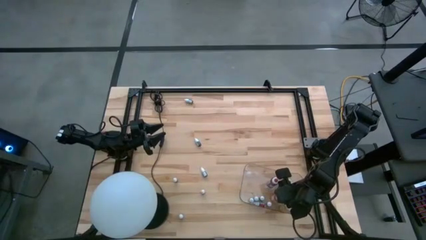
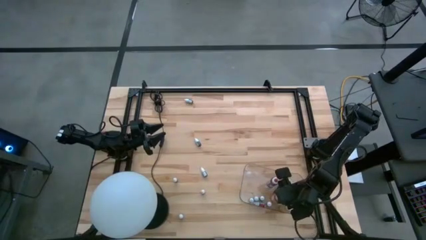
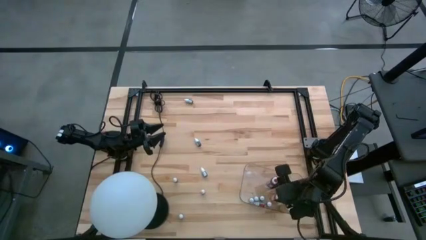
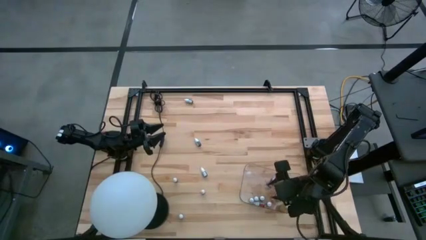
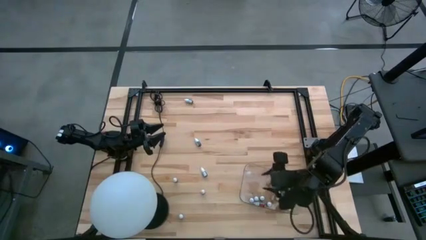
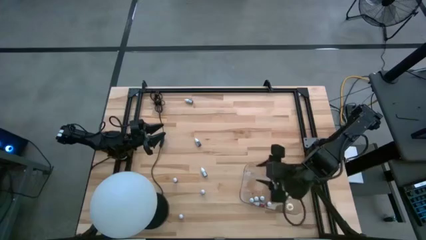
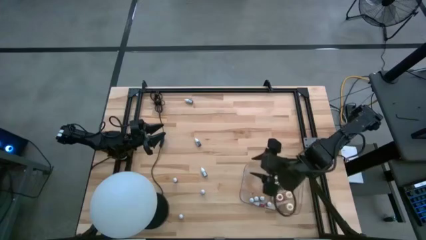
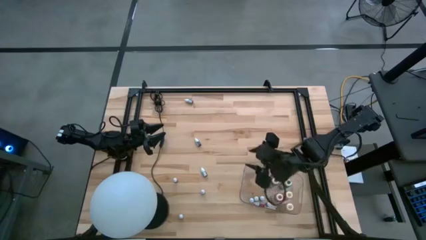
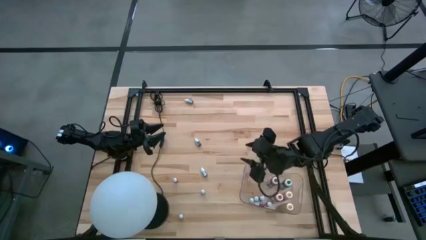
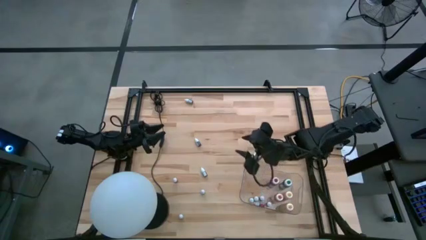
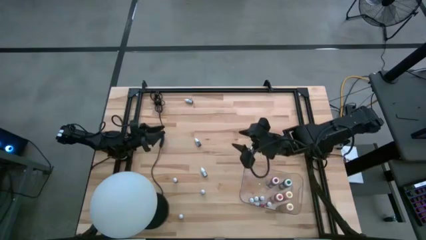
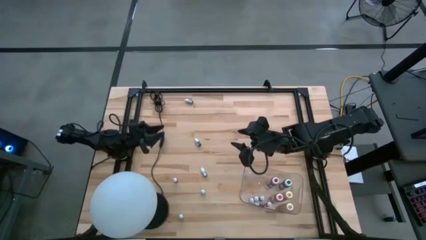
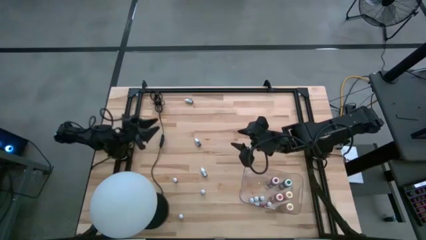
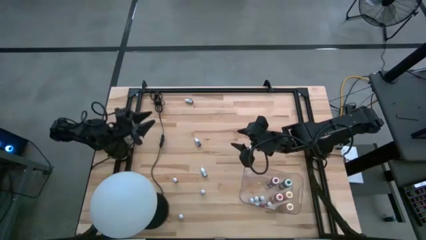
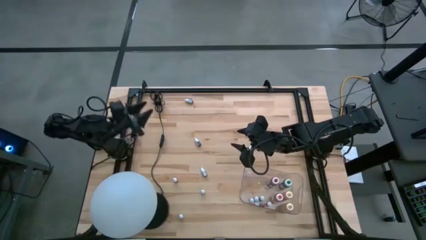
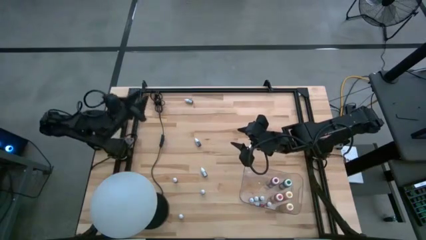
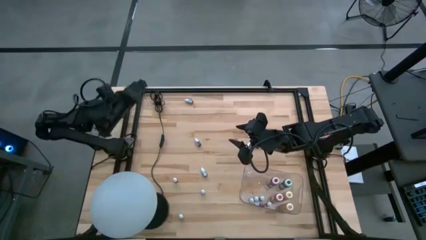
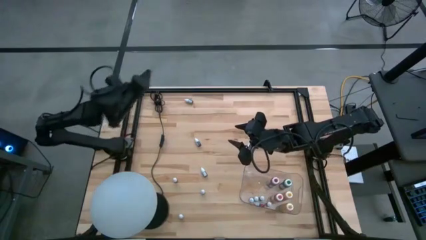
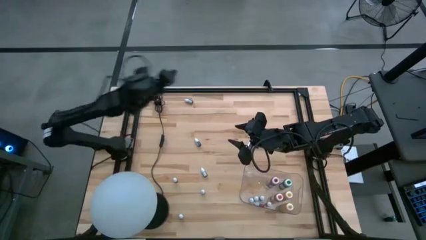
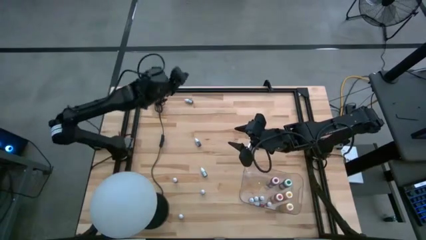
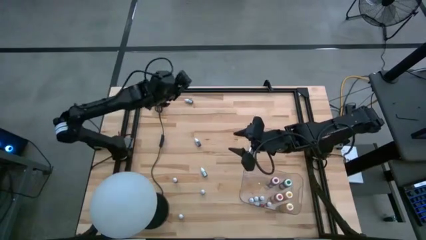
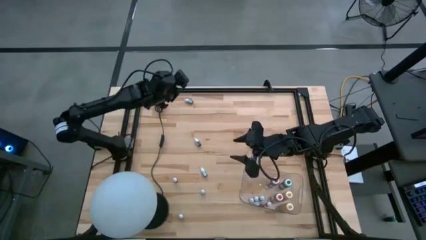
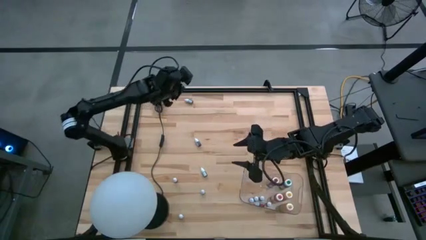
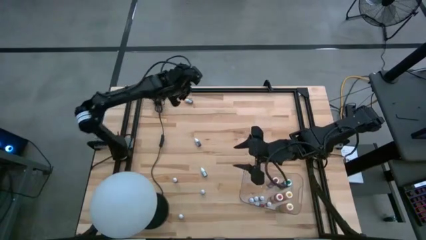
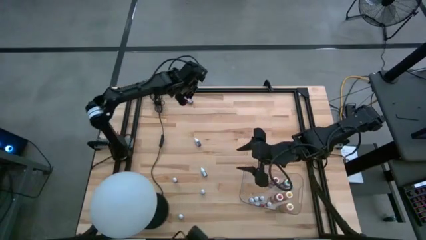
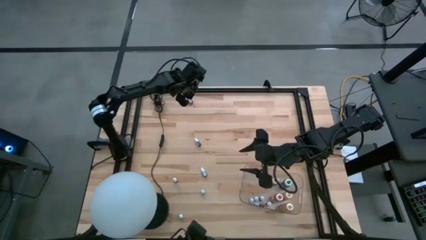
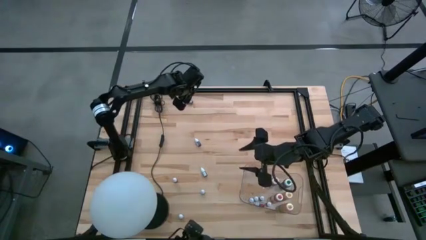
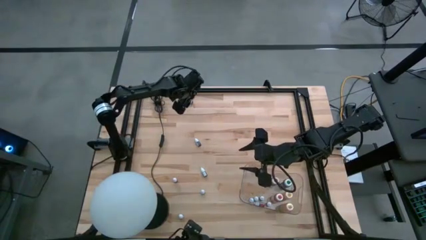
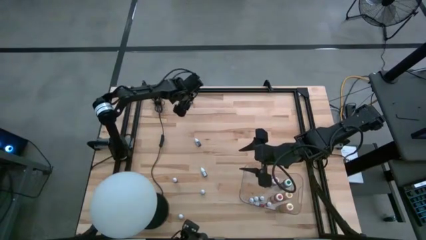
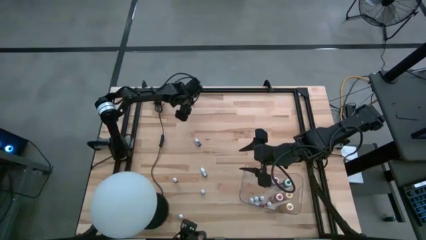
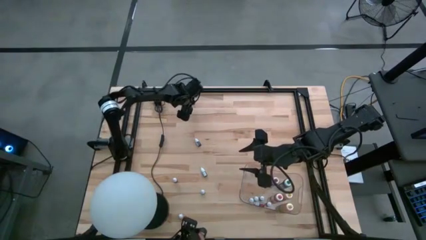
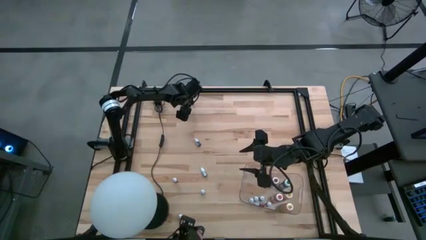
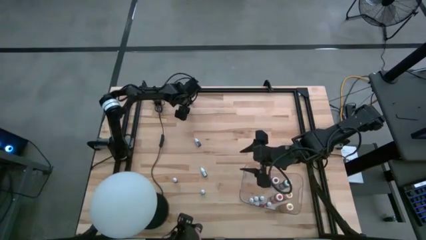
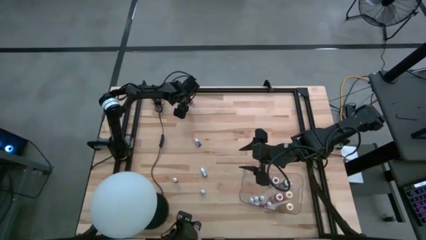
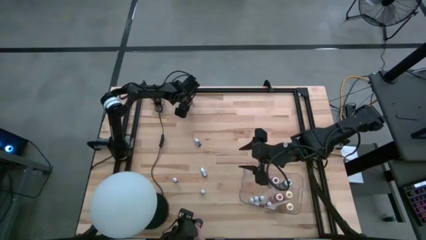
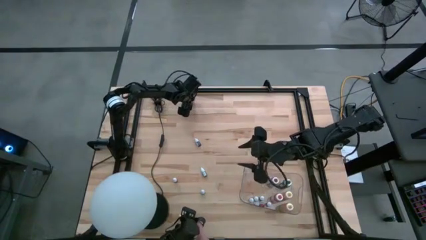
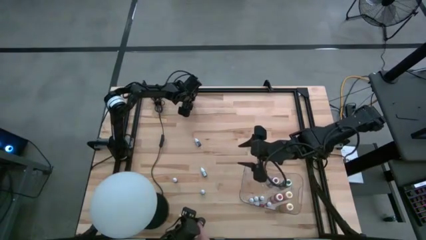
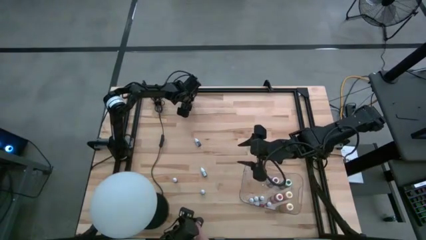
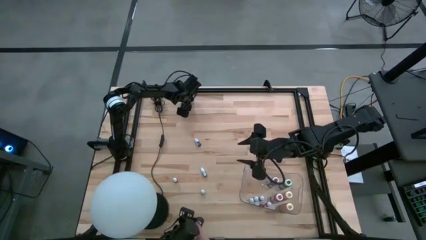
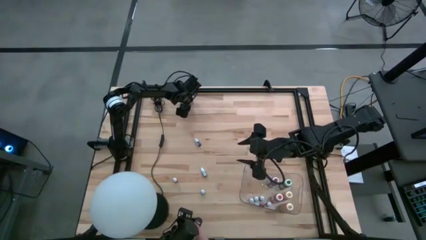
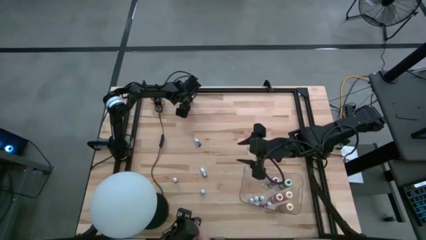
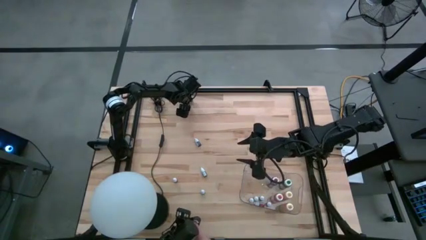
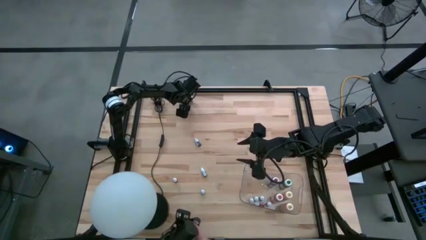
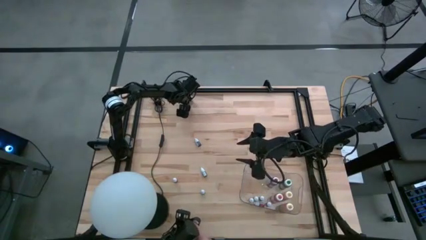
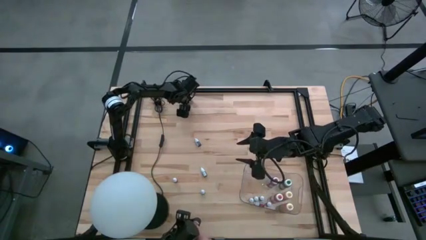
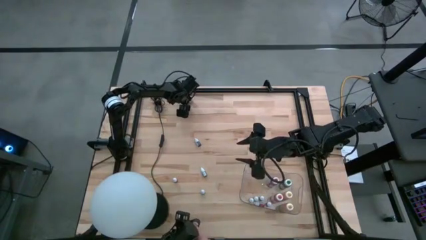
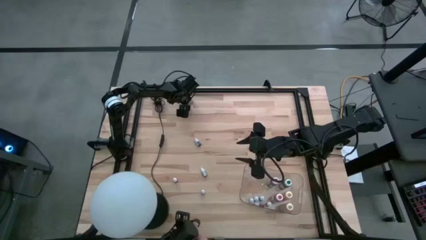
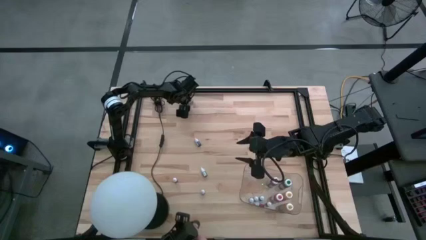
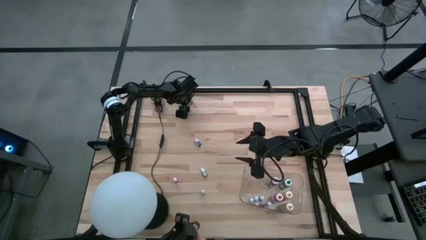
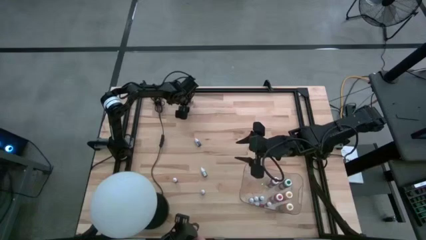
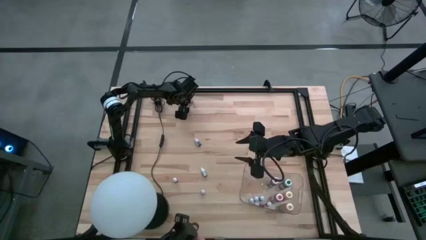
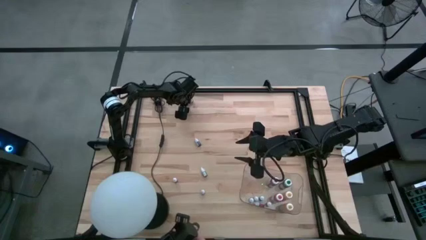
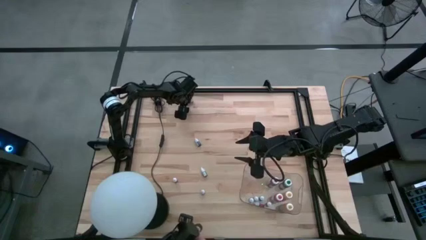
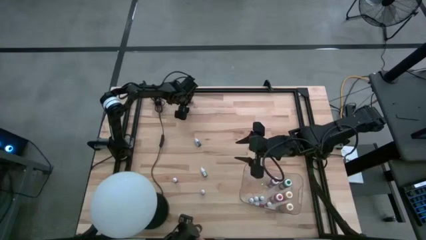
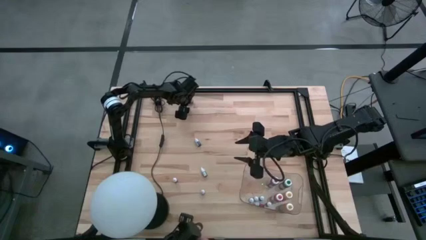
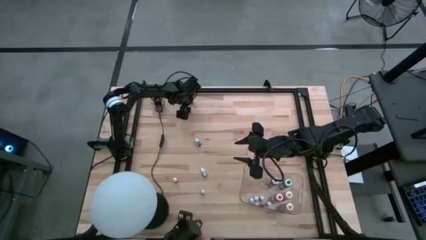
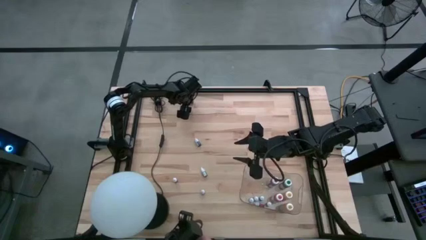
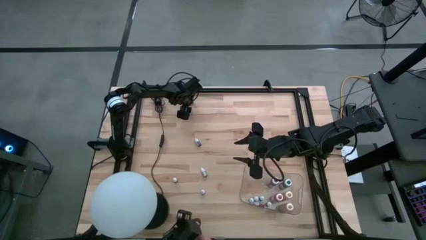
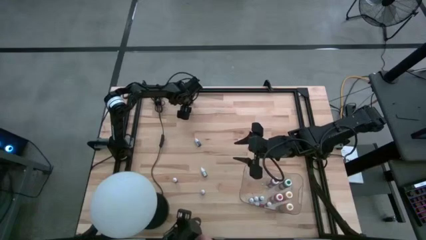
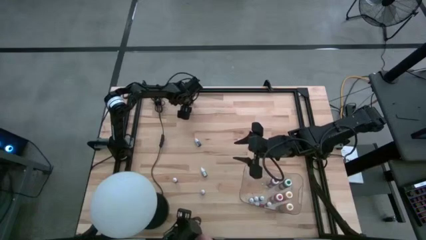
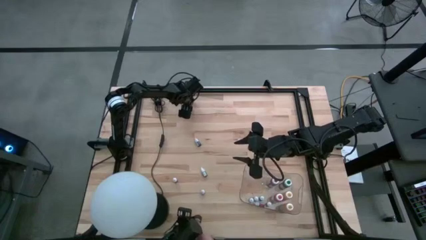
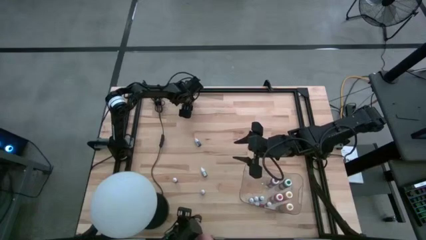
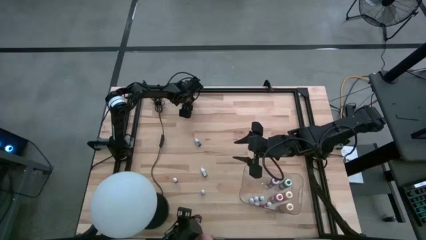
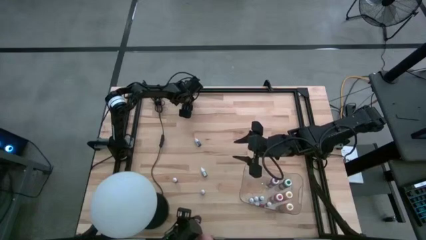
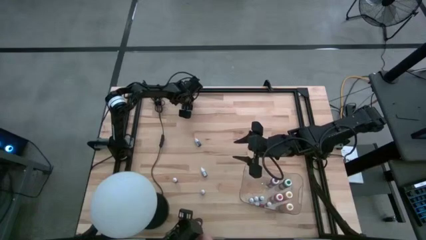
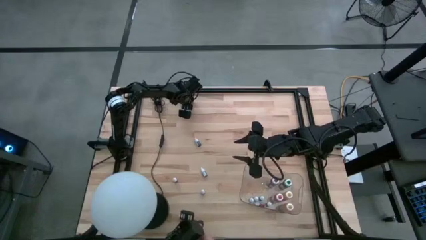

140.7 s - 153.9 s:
Task: Pick & Place food coloring
Put the black food color into the transparent bin

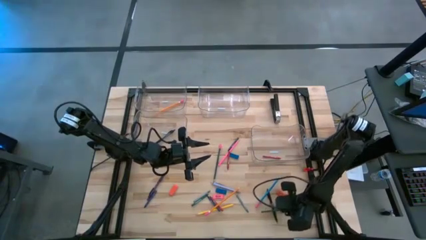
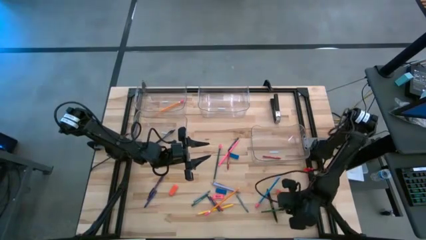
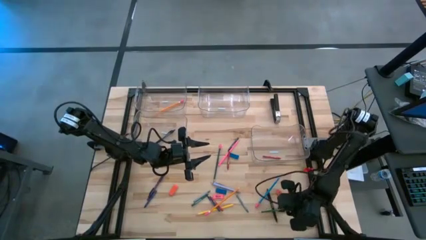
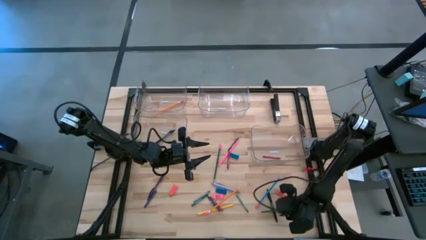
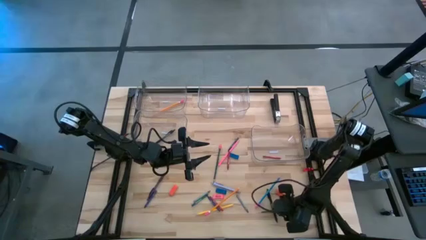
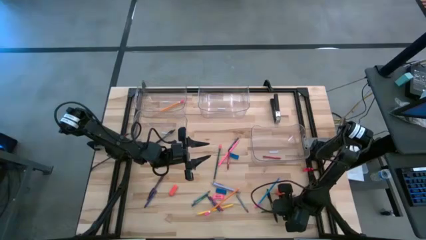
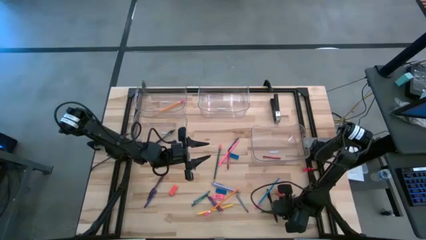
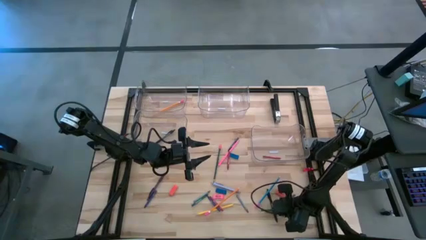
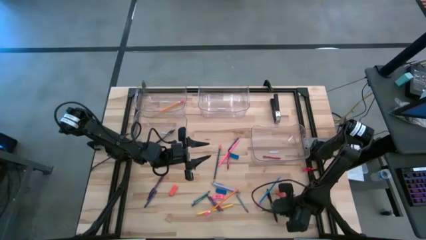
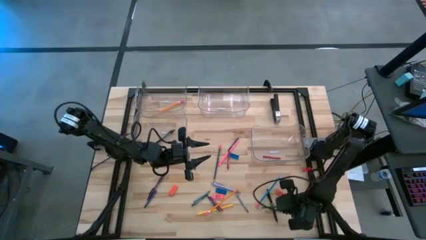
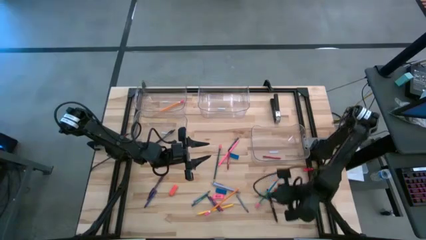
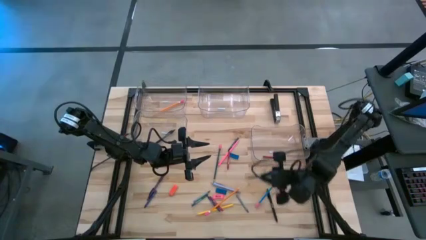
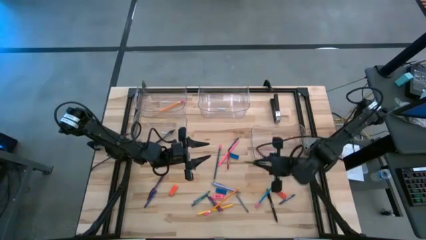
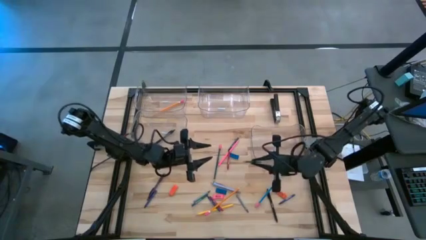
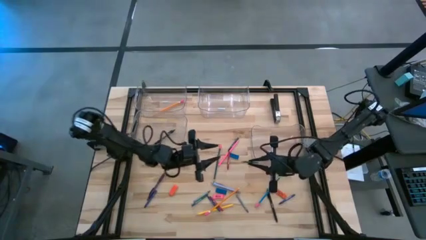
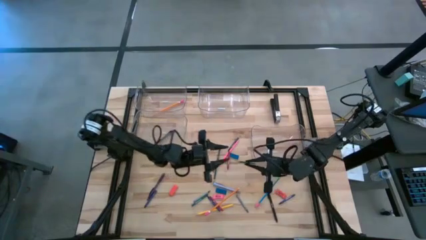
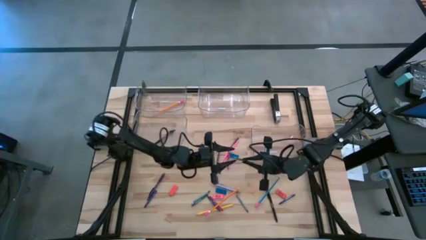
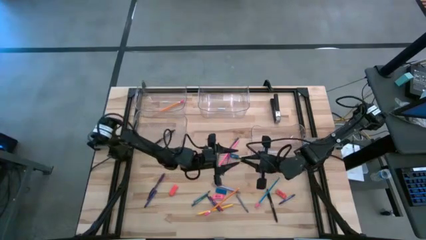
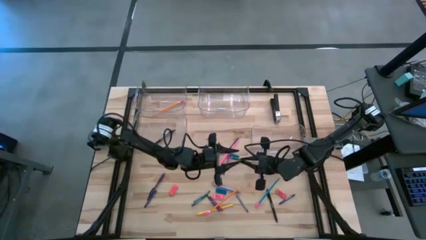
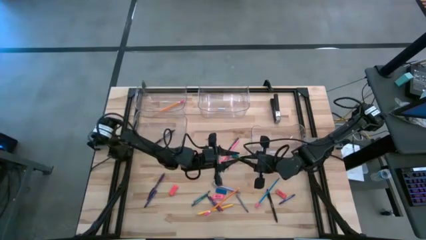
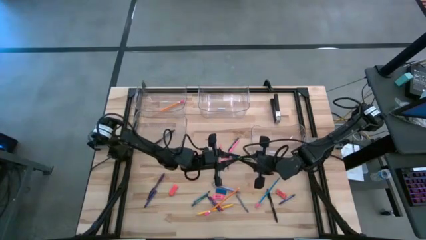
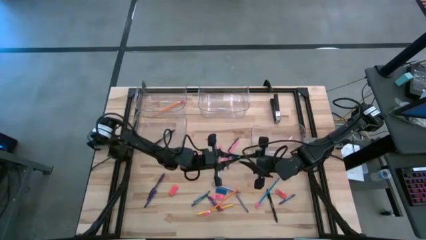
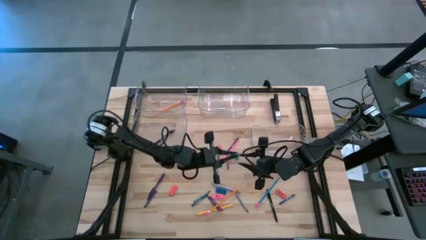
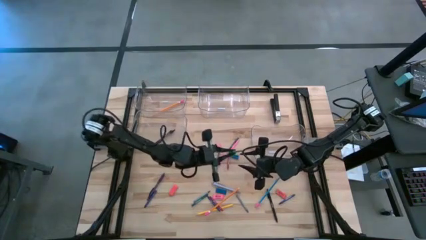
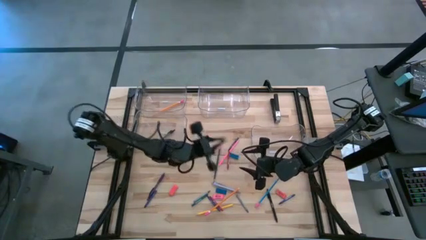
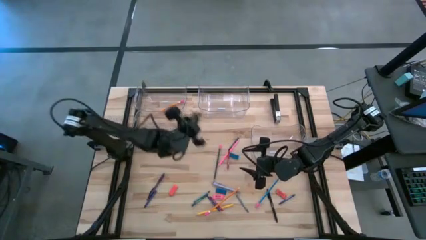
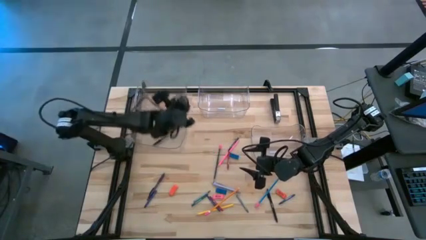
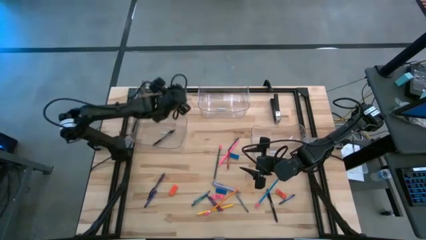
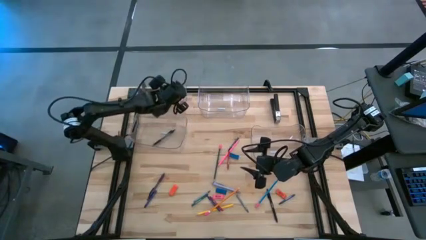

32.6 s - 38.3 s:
Task: Sort crayons/erasers/pens/pencils in bins
Put the green pencil into the top left transparent bin
